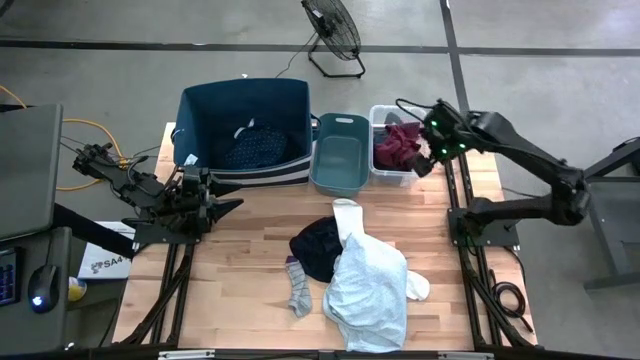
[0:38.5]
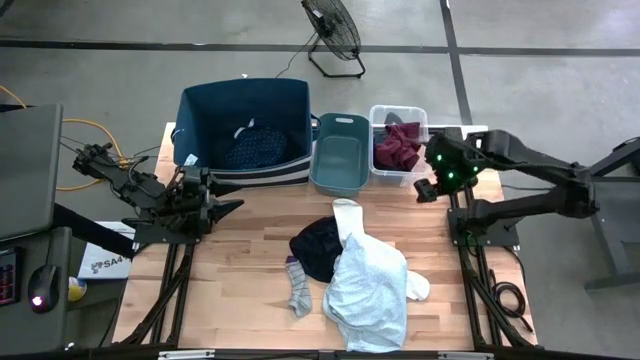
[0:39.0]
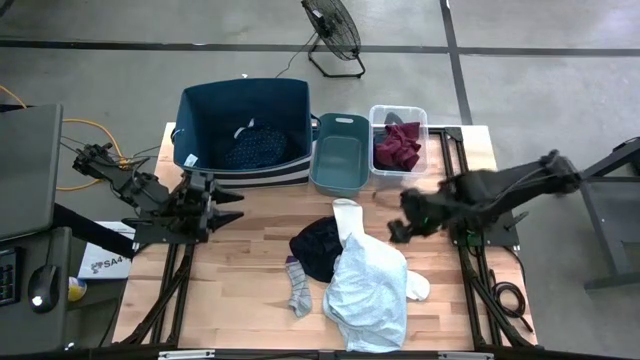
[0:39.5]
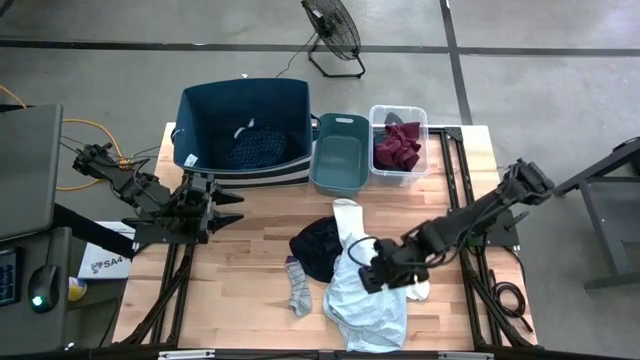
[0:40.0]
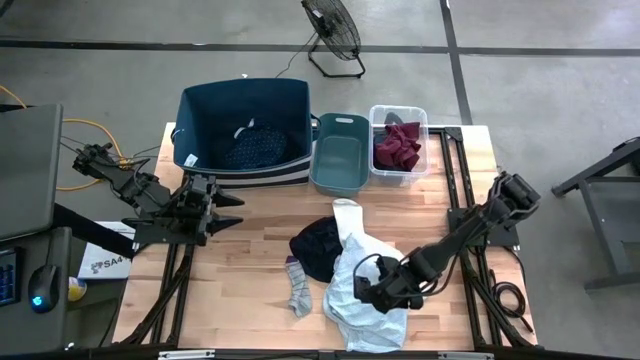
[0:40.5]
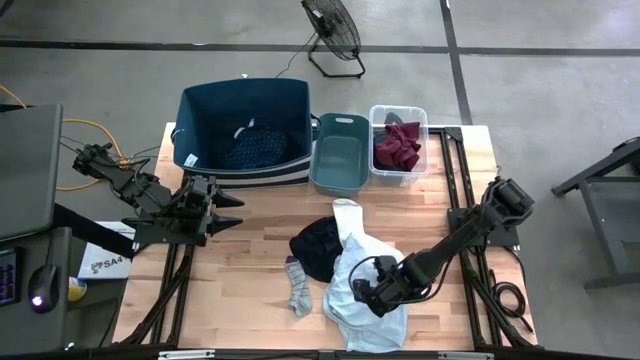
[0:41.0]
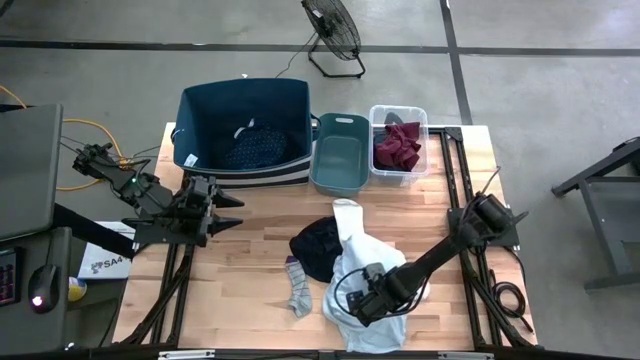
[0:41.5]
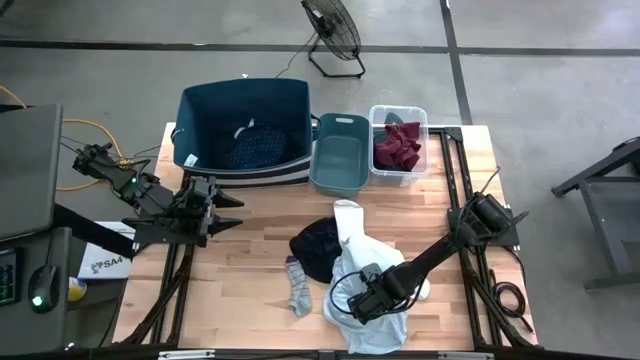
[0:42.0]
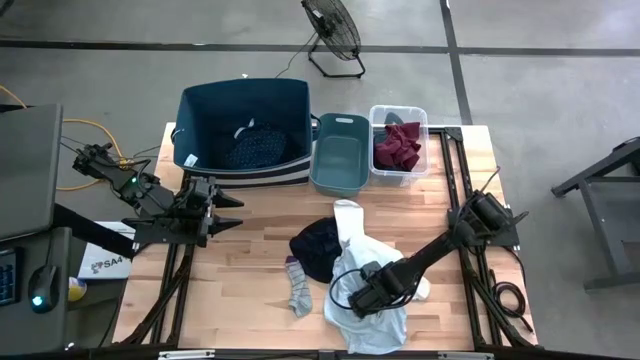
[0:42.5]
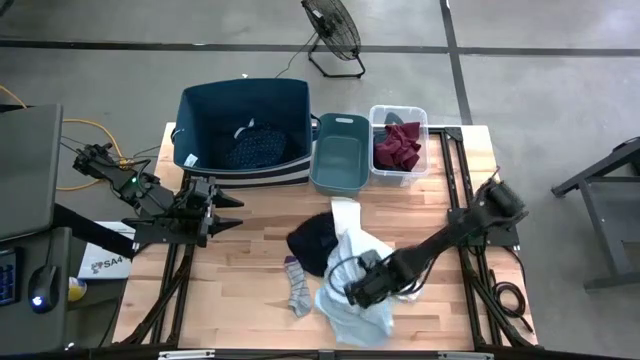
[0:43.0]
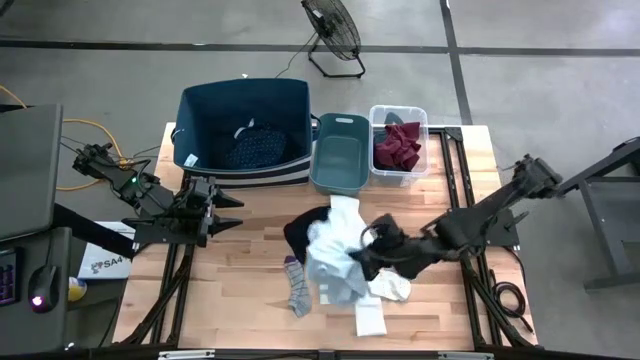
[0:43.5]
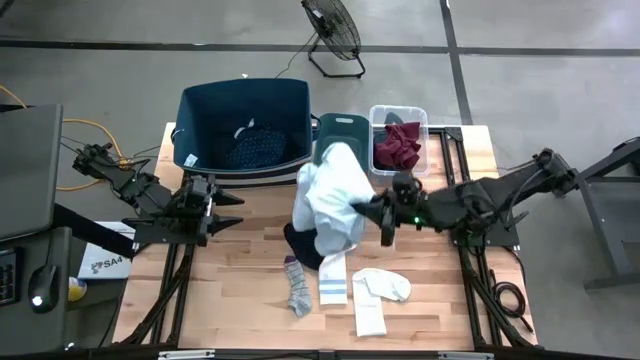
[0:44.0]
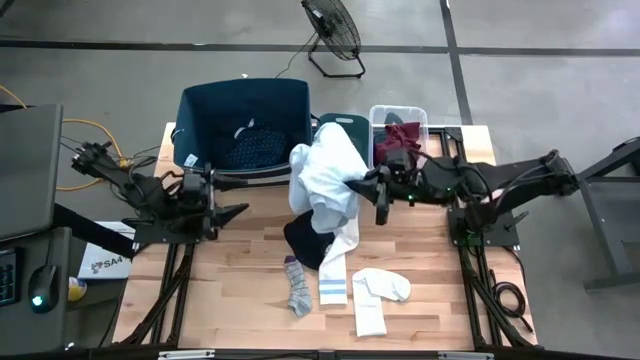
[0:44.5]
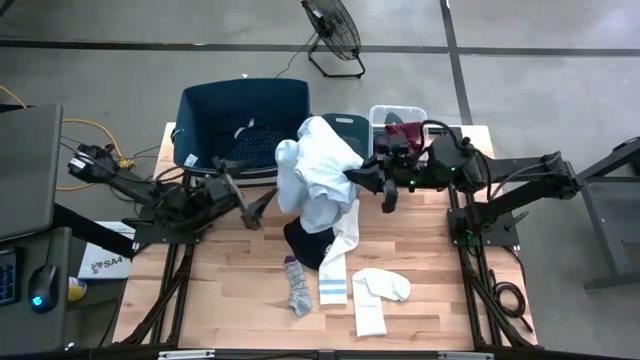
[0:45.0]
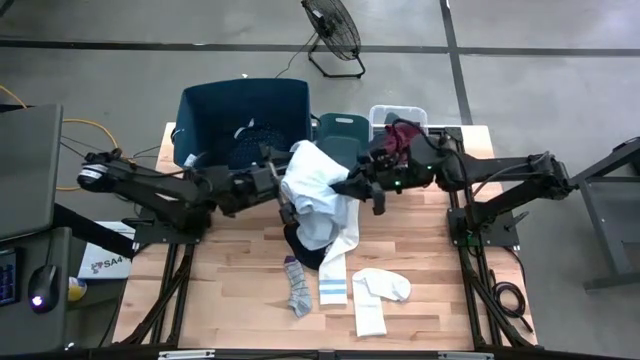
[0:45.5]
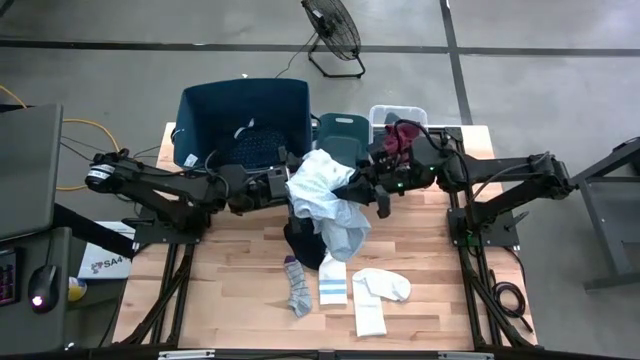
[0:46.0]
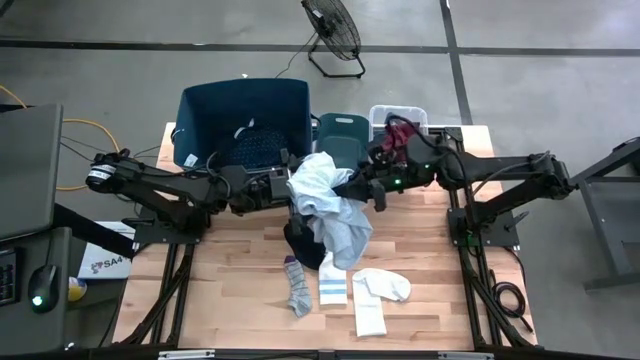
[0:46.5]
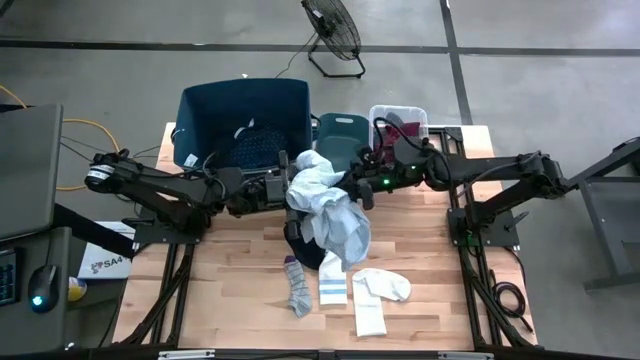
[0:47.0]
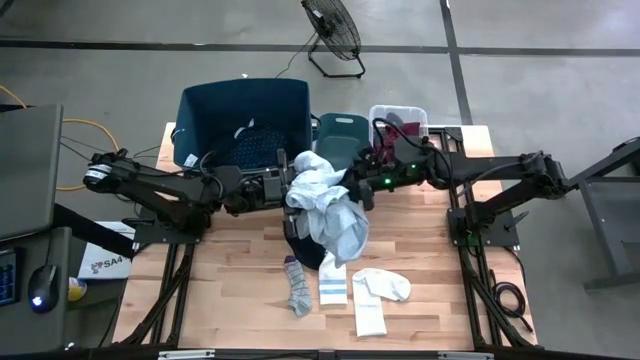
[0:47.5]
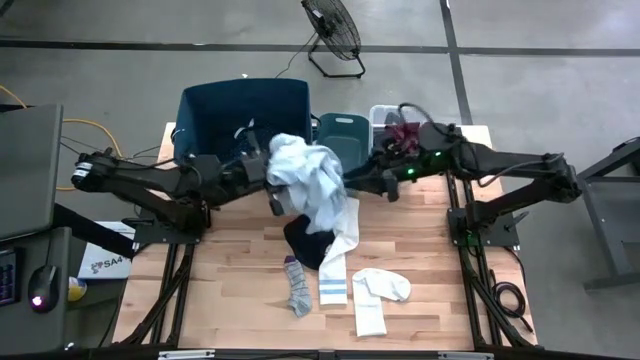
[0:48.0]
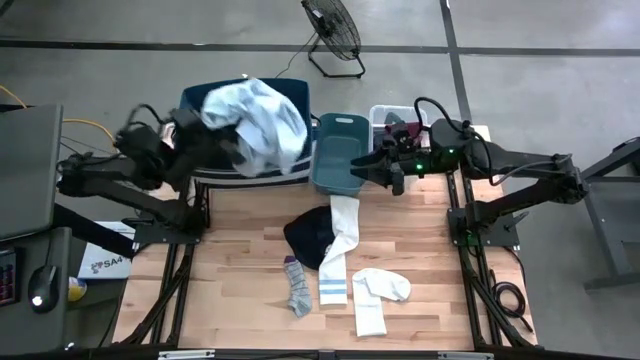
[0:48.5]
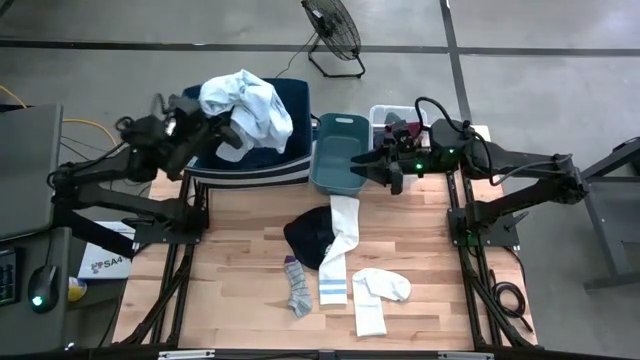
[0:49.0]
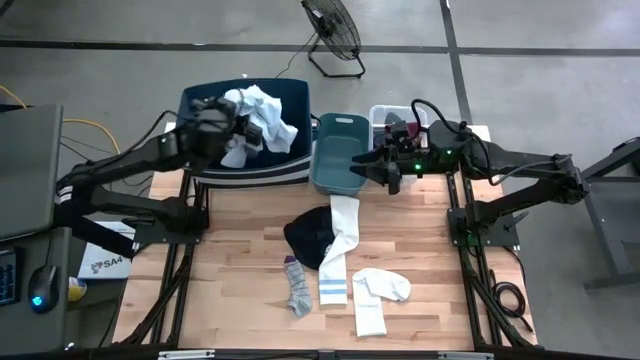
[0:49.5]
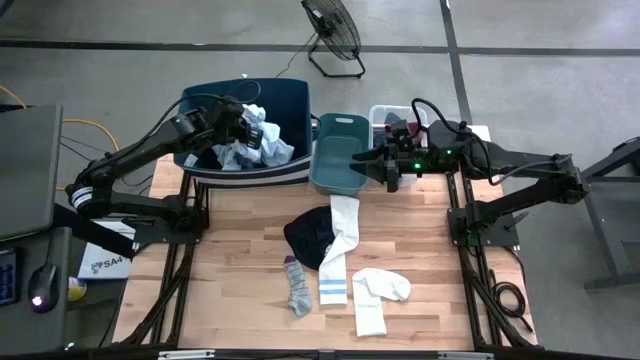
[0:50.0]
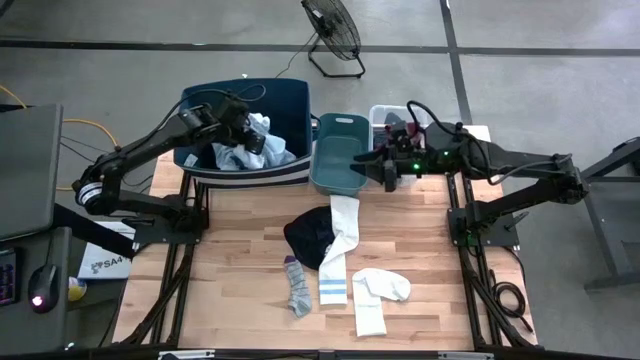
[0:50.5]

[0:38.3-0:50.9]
Task: Pick & Place Cloths
Put the white shirt into the dark blue bin

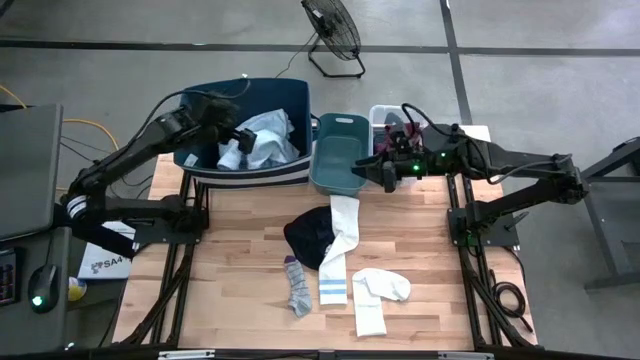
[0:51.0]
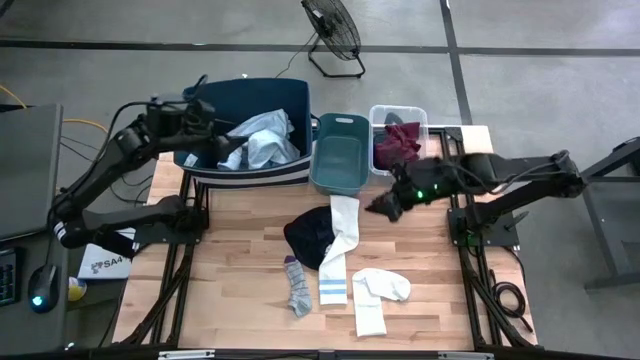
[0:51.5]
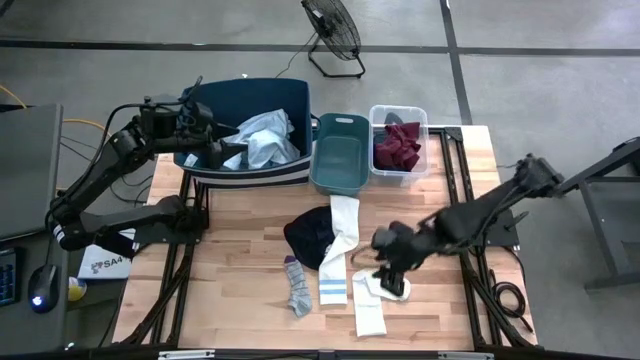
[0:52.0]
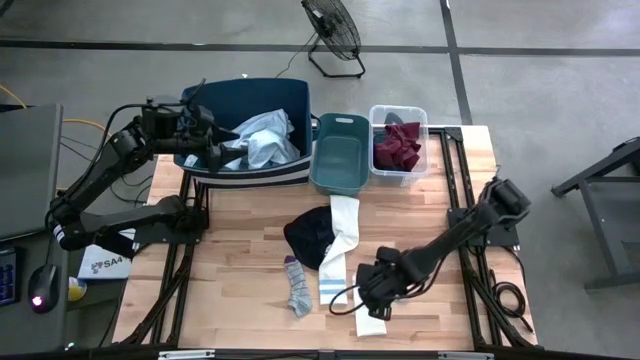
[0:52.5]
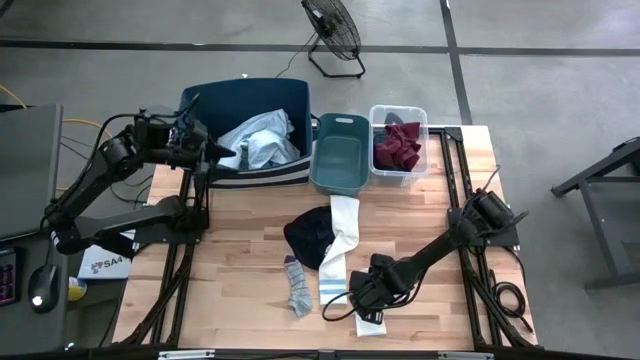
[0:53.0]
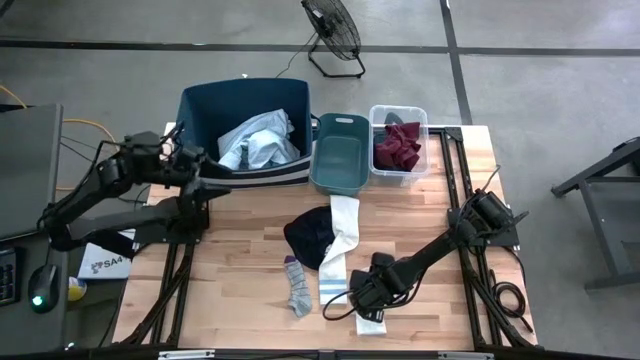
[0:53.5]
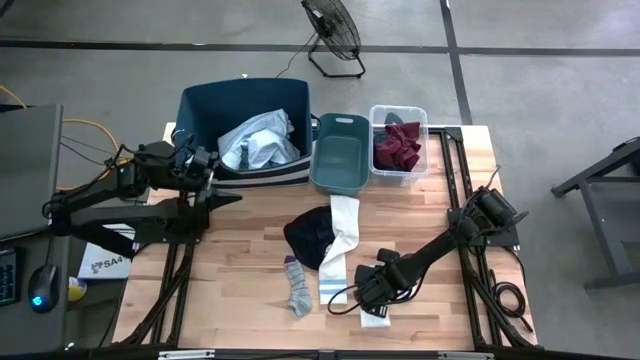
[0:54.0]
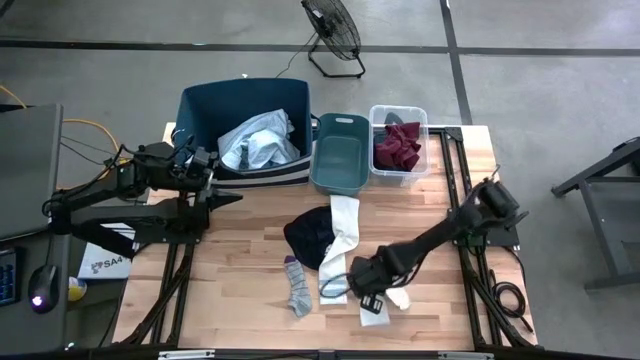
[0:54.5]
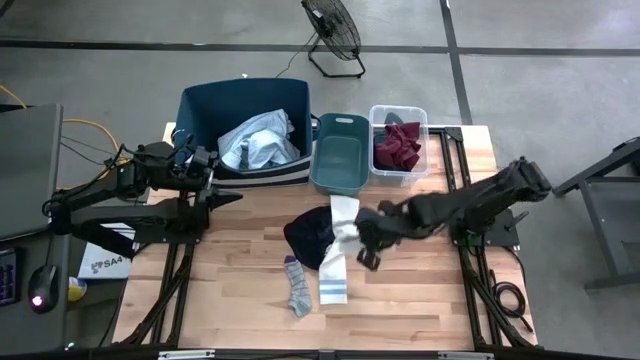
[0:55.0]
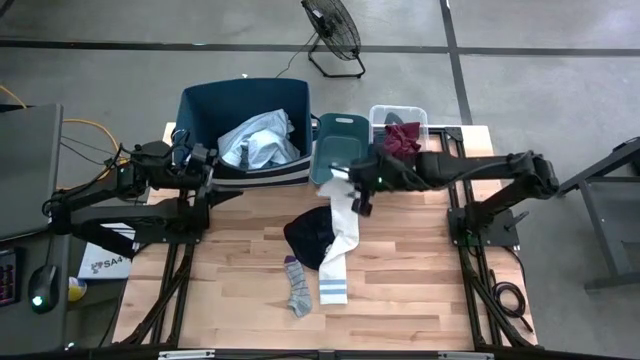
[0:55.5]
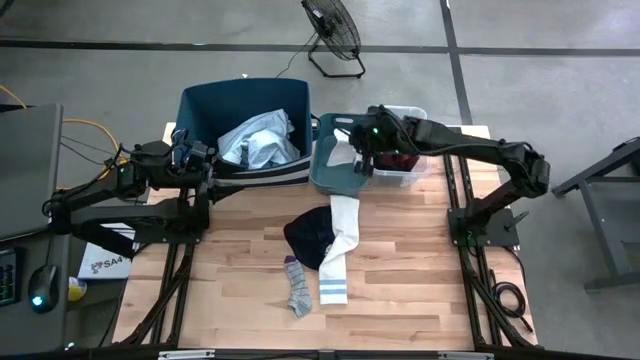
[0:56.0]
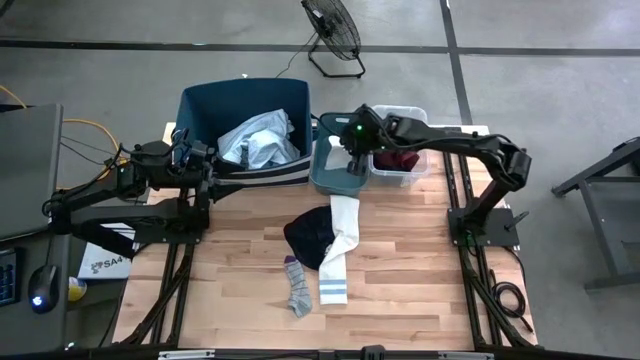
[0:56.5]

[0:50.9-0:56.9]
Put the white sock into the blue bin

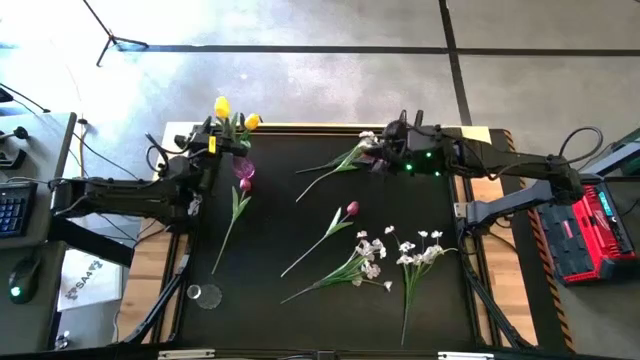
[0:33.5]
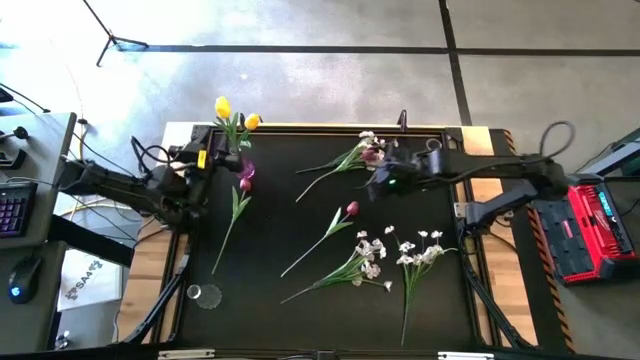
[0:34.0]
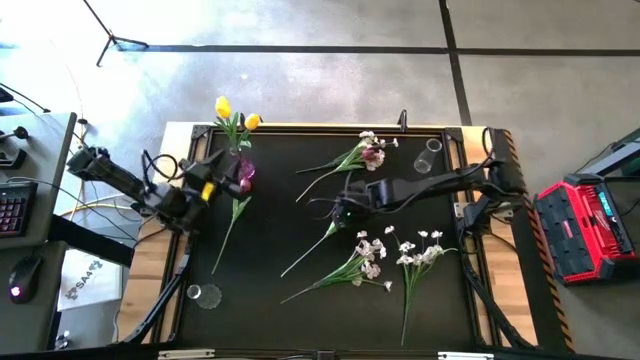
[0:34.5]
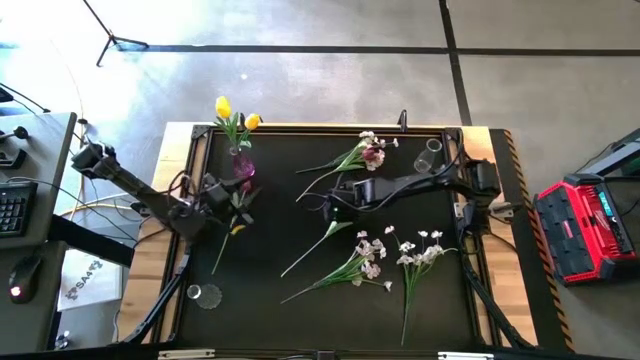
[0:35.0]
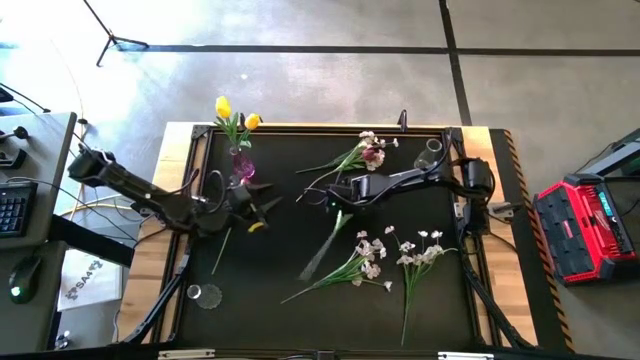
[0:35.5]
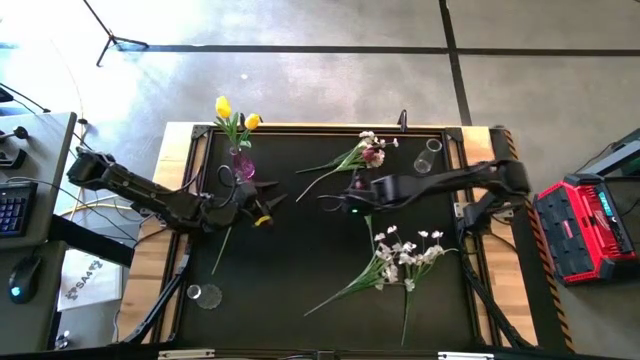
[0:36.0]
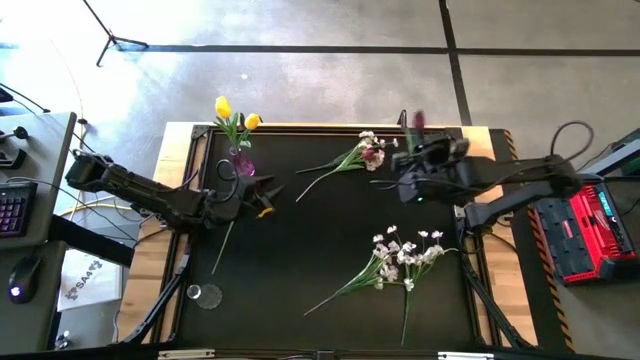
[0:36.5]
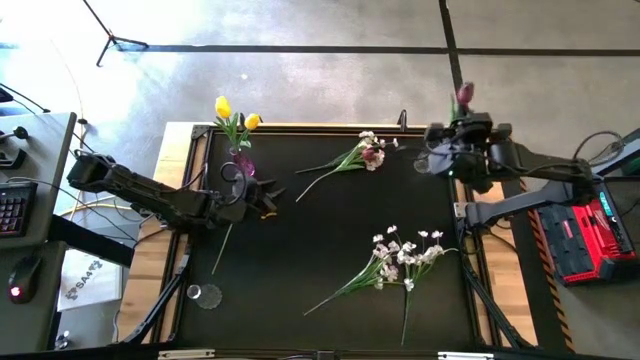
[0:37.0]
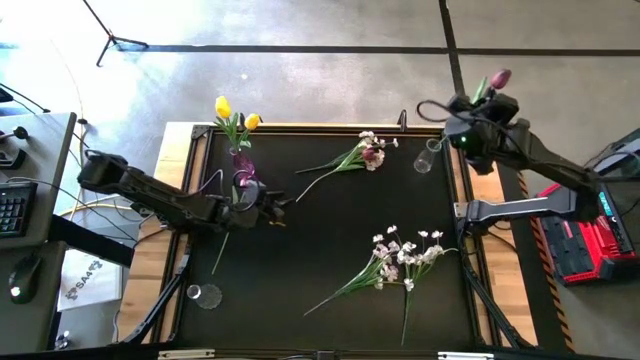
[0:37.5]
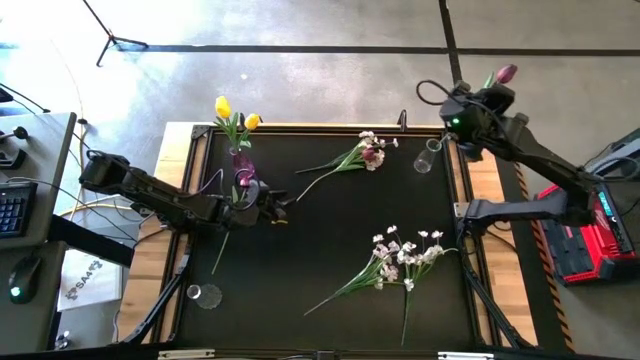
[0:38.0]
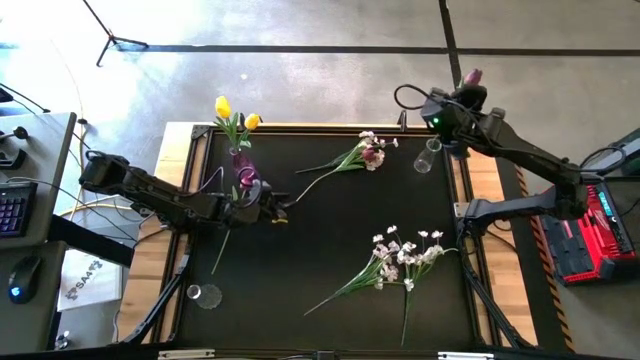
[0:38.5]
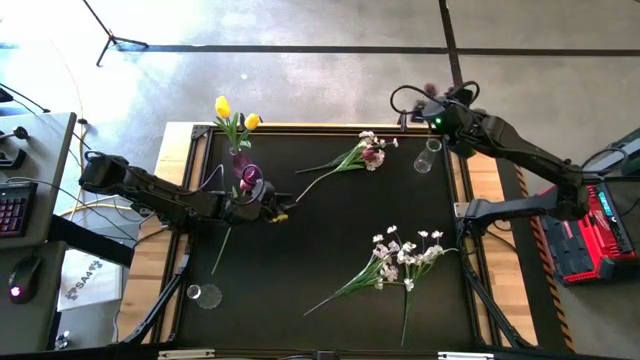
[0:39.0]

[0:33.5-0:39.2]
Task: Sort flowers into vase by color
Put the bottom left red flower into the top transparent vase
